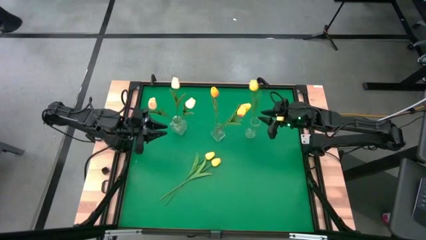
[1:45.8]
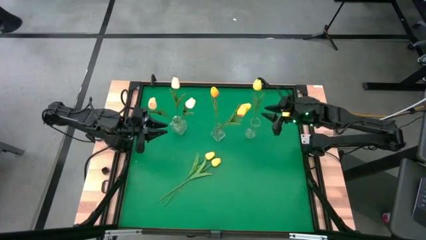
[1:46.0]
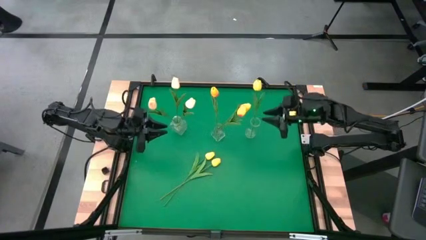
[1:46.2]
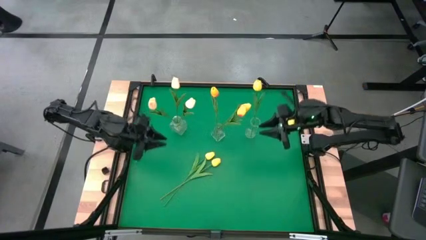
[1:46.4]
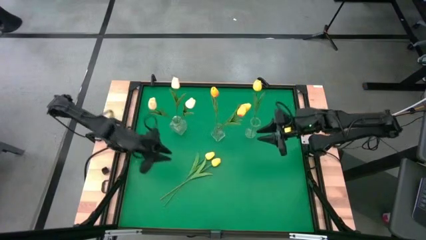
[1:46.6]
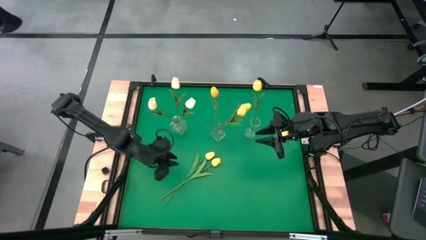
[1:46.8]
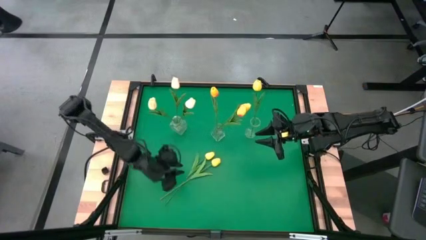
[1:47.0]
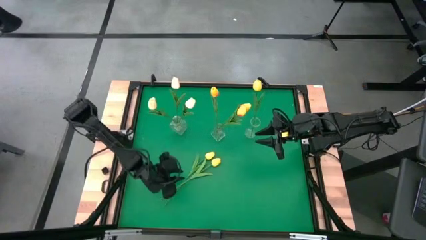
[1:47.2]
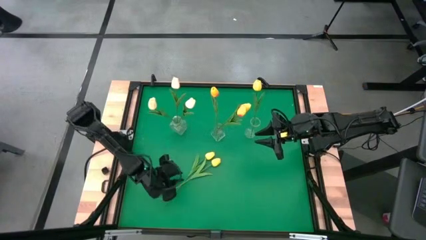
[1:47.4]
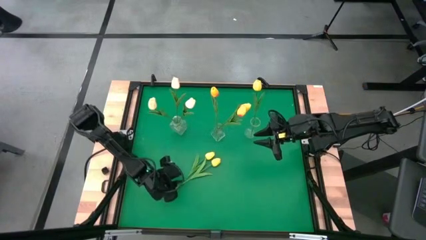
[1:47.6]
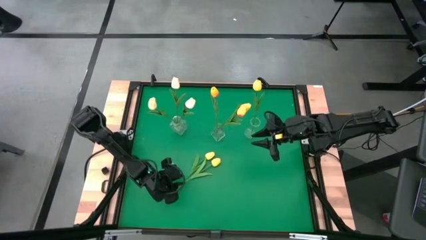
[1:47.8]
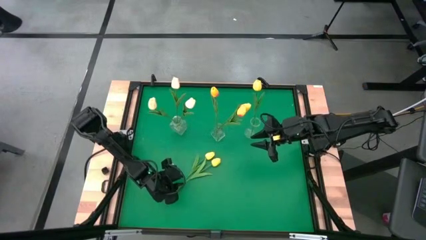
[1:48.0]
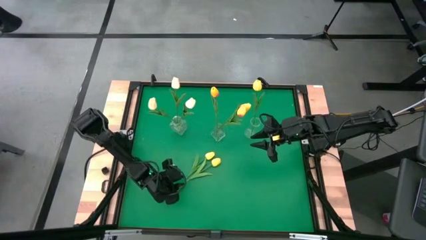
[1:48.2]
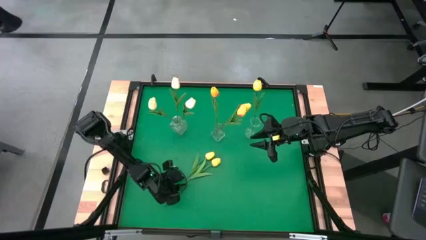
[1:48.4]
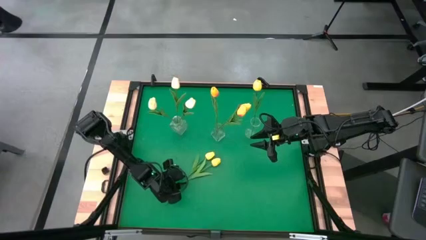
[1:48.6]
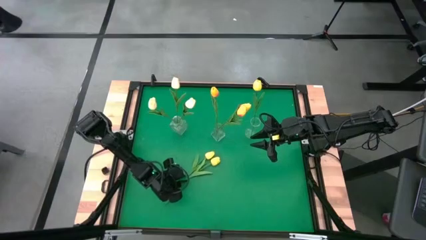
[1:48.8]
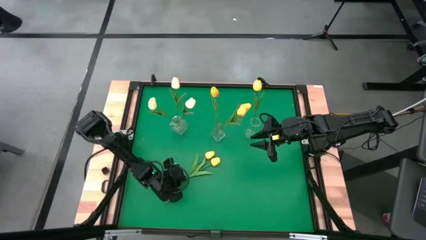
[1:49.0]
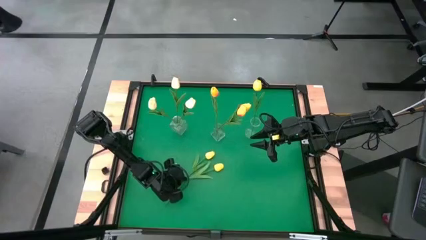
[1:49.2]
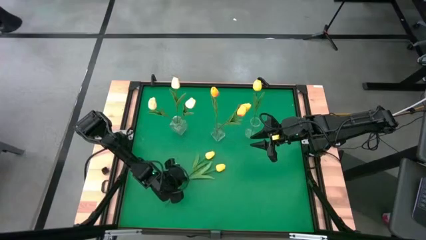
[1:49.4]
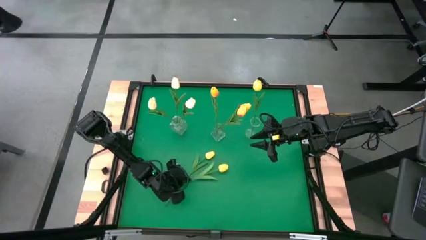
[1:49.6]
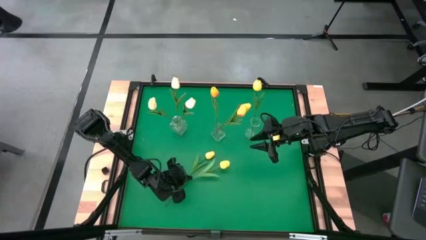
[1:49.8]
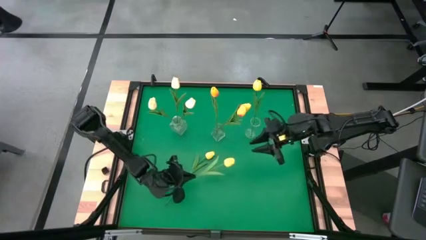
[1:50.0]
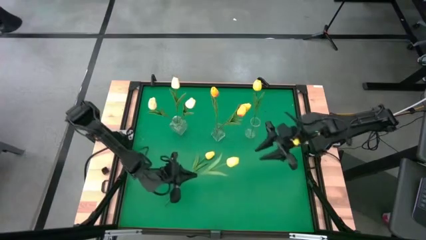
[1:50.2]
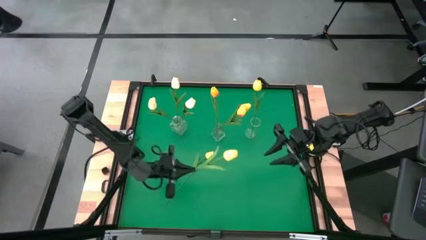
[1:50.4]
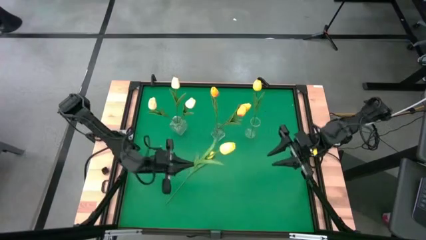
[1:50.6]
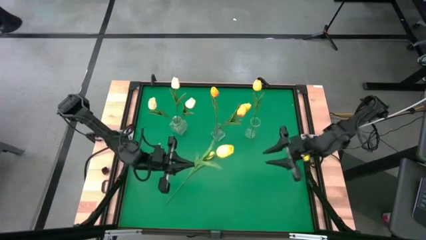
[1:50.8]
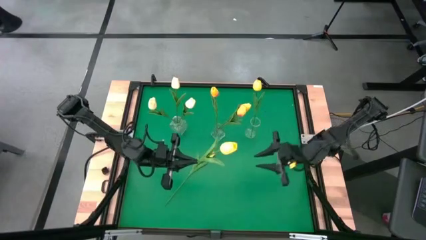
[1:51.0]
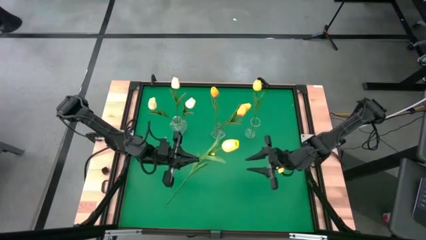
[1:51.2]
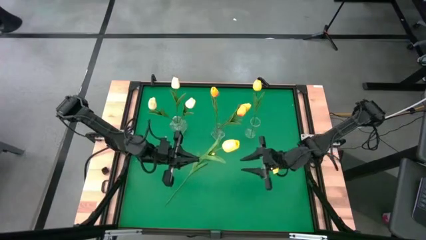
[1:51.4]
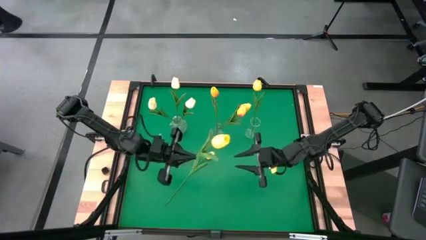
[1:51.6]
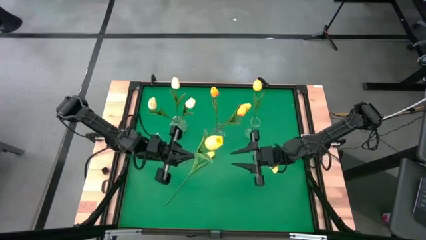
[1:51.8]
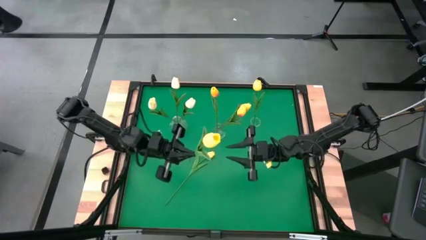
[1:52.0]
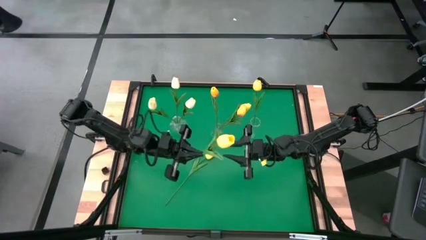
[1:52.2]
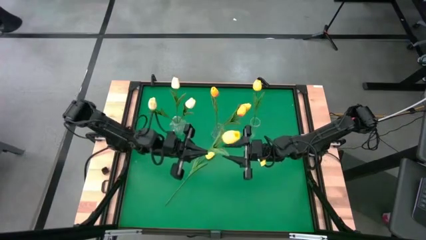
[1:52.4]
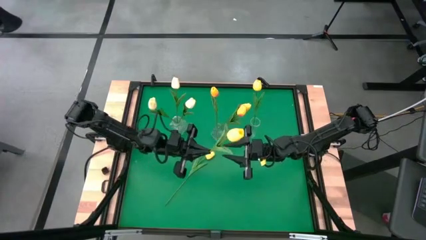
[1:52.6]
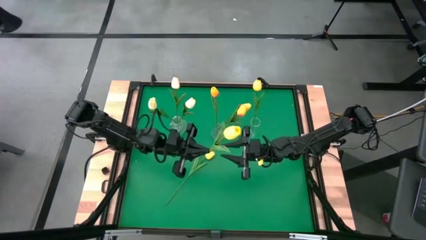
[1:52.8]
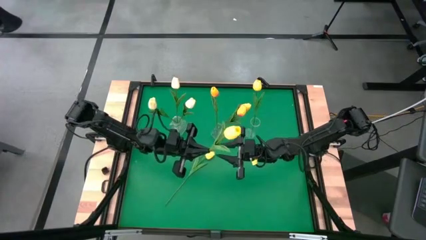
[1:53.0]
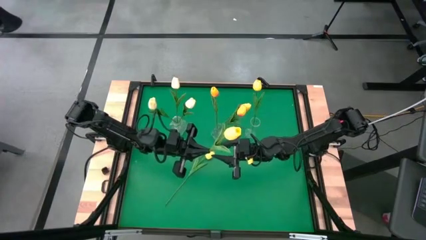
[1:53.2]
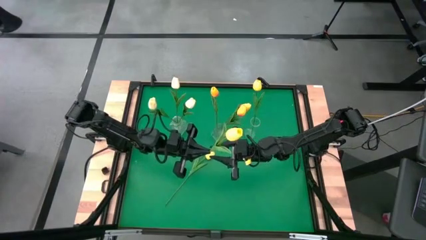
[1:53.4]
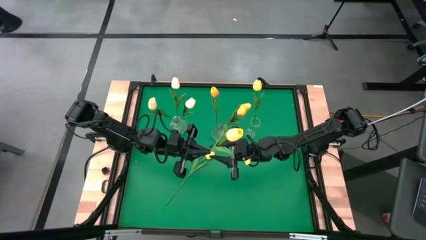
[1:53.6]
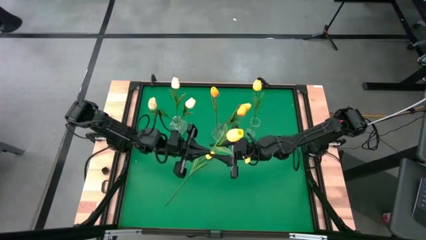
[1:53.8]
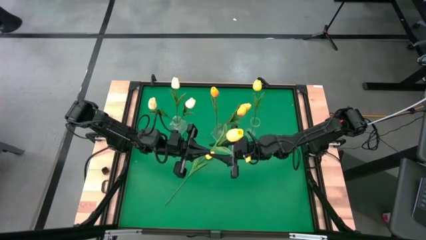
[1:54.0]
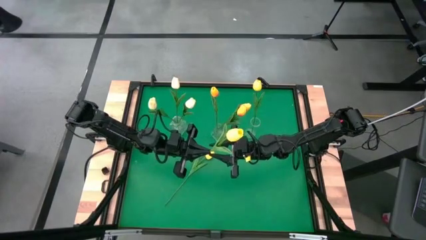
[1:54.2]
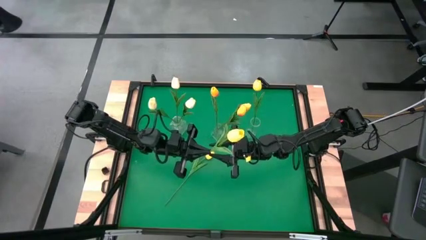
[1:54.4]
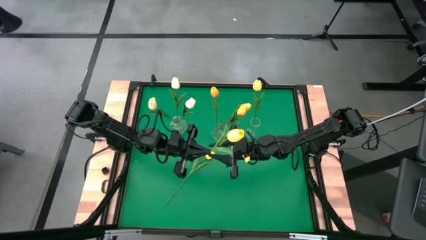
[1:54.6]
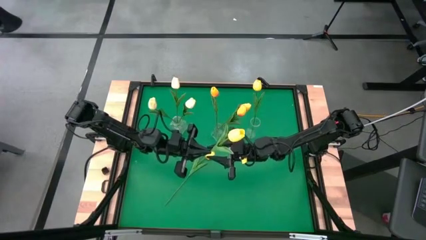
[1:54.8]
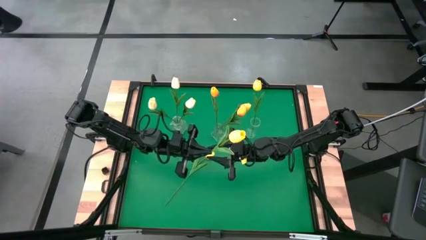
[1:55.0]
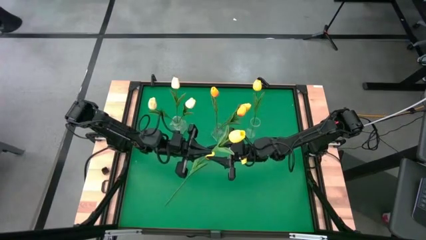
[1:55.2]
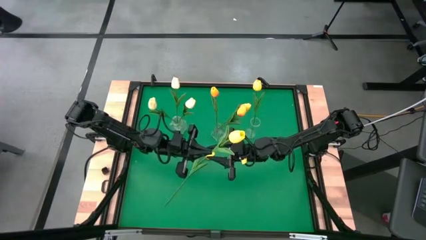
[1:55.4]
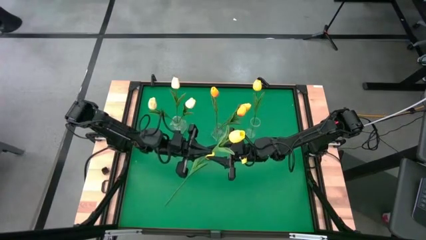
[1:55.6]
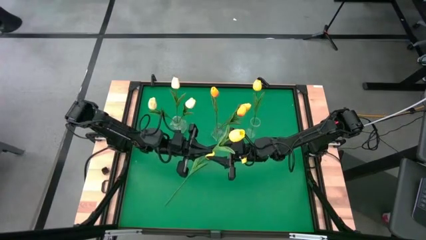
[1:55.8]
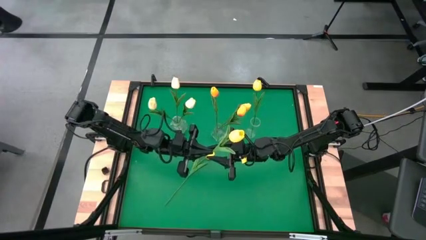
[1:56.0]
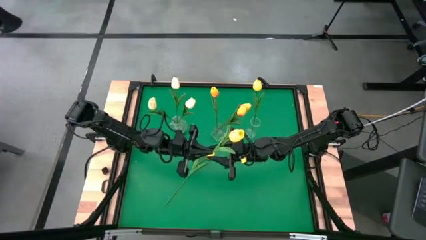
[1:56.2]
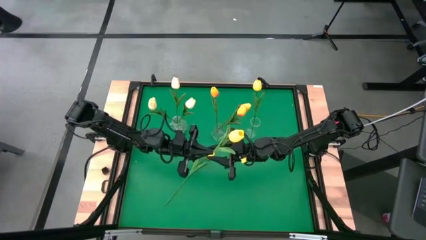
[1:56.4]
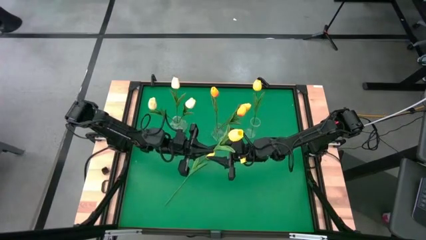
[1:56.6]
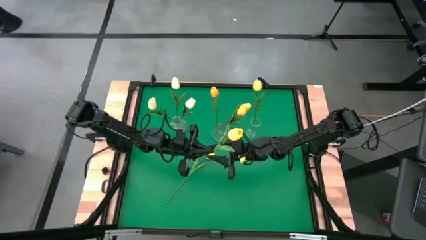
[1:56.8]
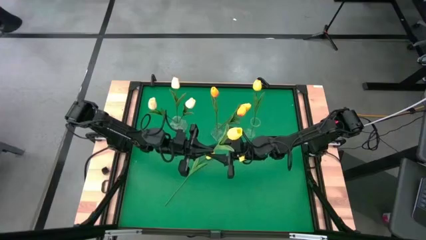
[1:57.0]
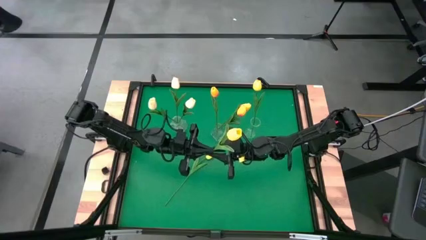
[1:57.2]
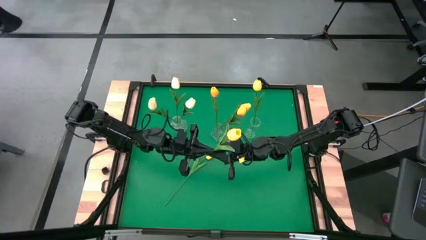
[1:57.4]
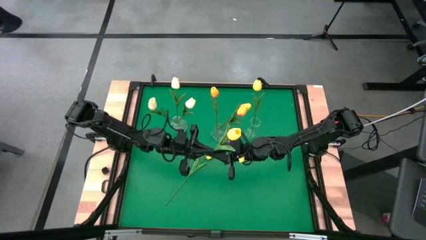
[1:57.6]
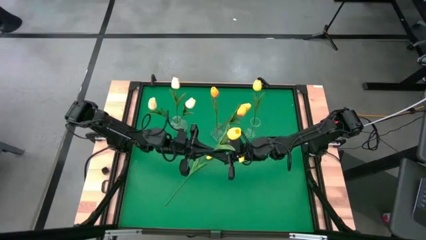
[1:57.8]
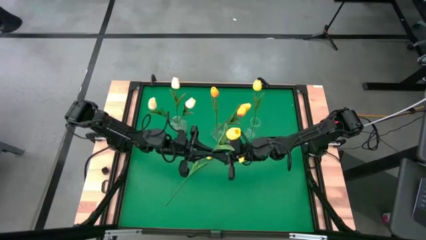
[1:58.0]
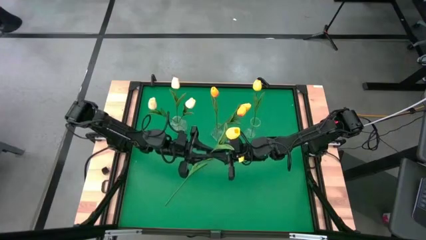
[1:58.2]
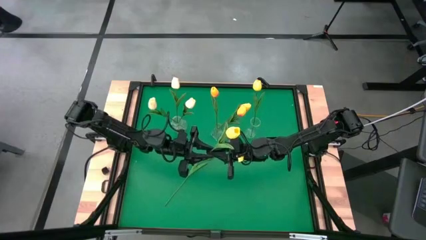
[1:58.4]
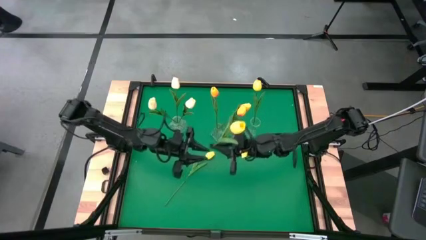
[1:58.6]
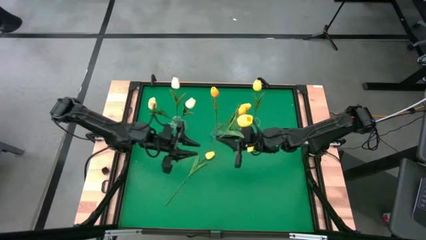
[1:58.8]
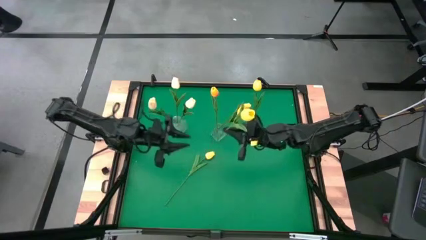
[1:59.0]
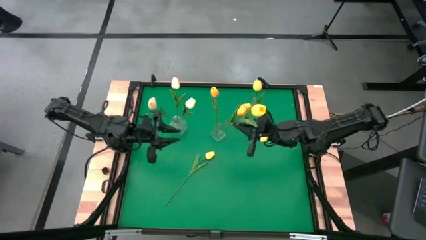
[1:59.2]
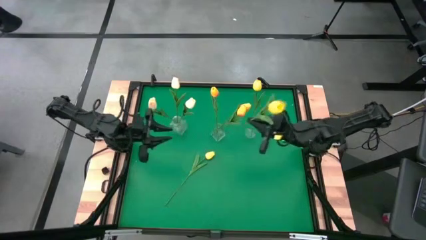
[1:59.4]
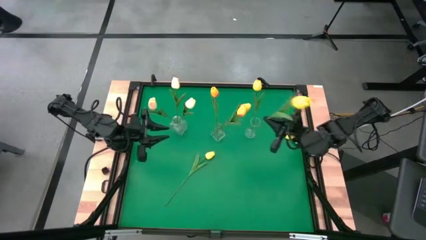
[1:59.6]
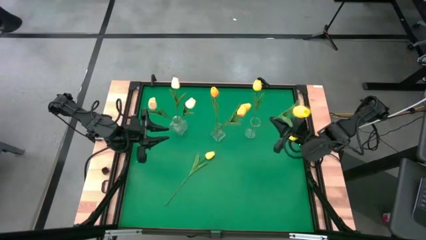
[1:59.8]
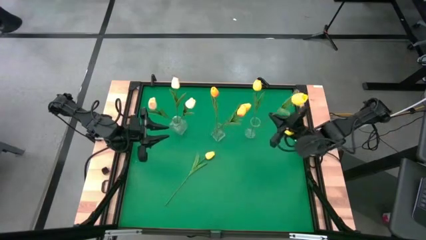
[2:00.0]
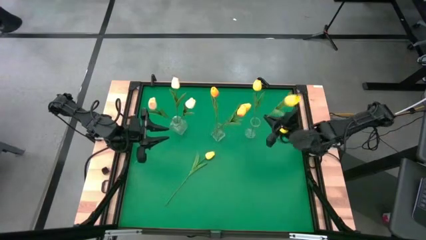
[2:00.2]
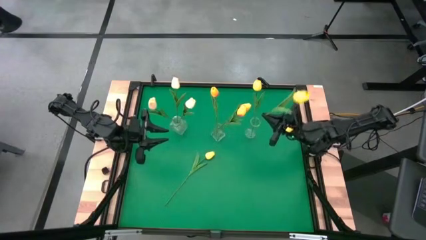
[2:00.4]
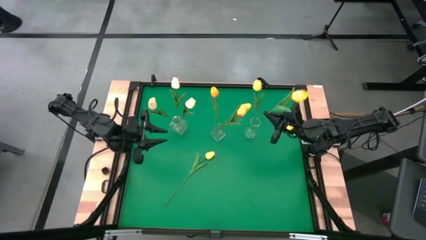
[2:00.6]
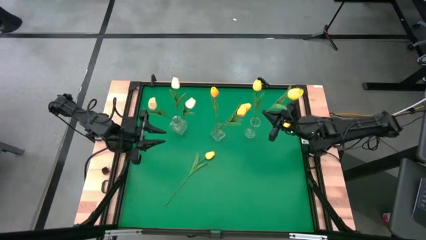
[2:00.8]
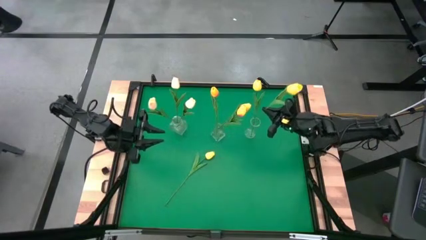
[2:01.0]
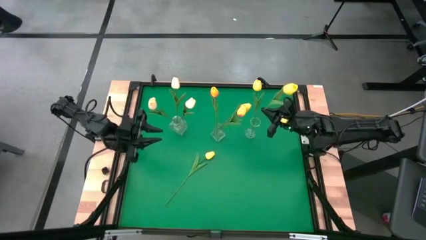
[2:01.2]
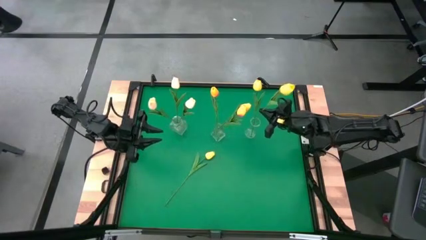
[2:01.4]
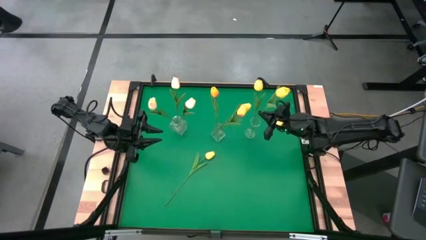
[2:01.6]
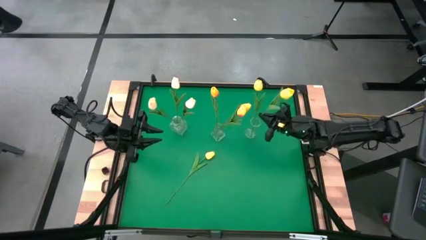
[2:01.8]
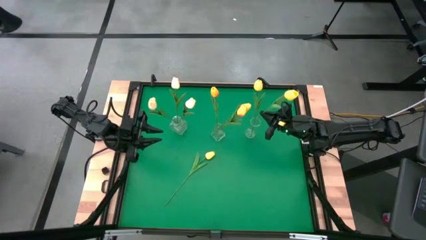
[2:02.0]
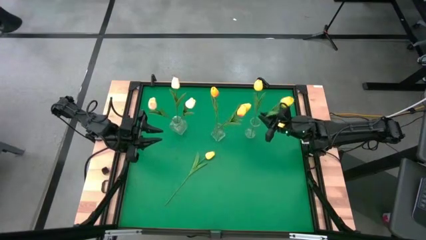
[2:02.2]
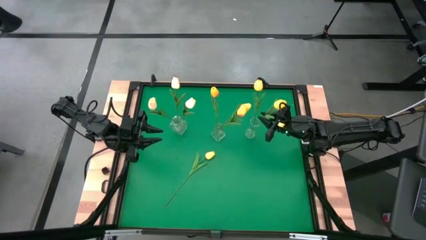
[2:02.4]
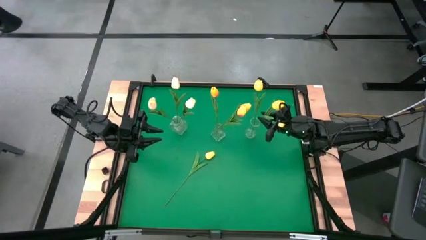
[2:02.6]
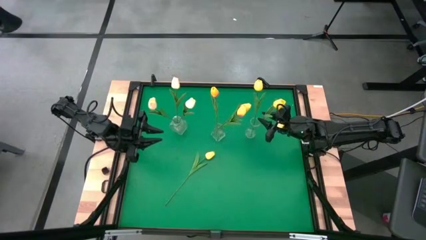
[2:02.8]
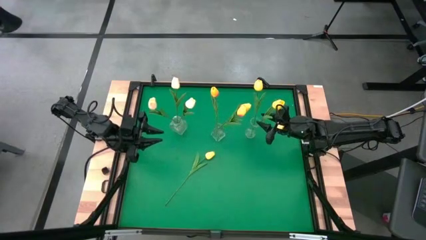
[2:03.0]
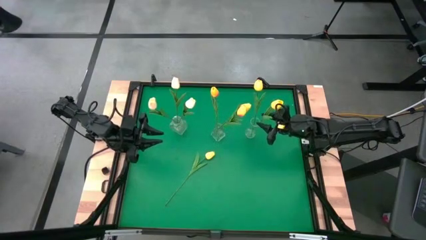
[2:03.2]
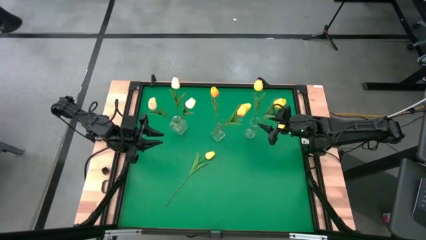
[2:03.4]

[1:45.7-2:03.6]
Task: Sort flowers into vase by color
Put the right yellow flower into the right transparent vase
